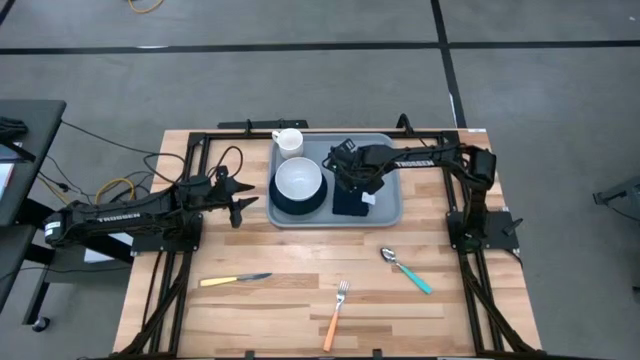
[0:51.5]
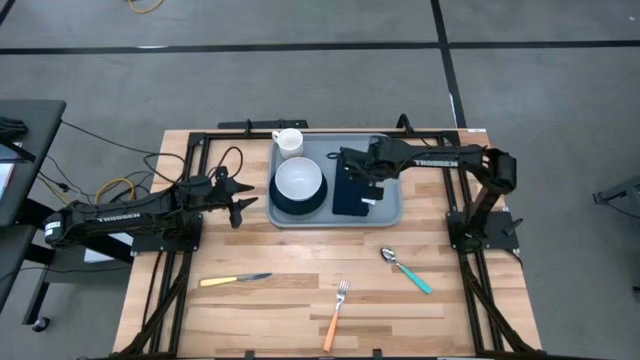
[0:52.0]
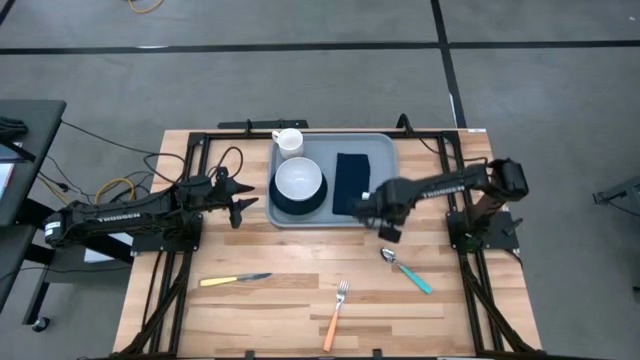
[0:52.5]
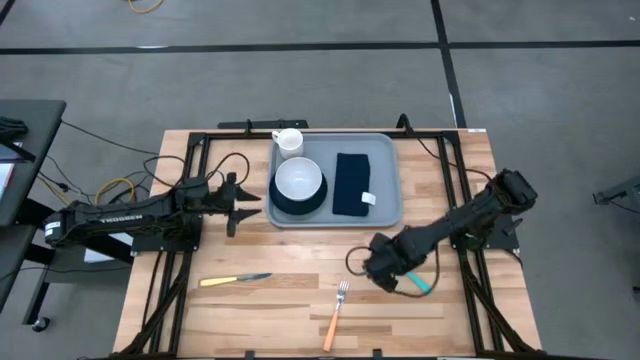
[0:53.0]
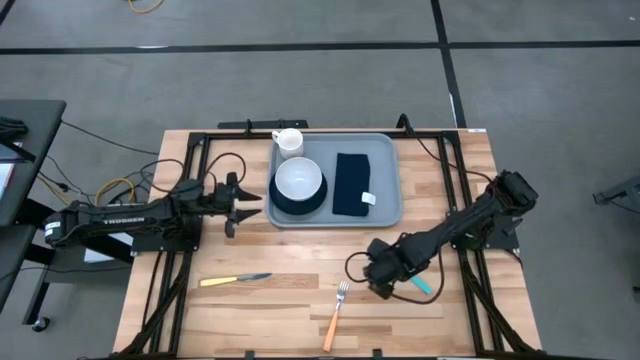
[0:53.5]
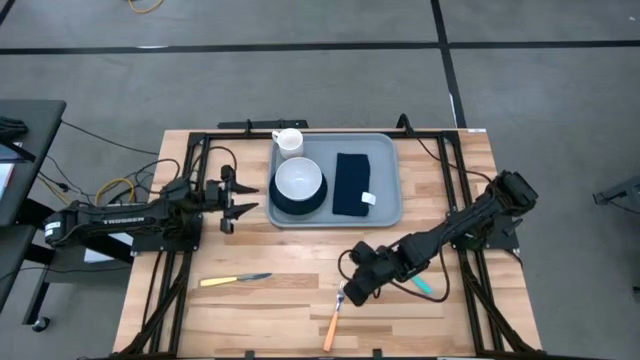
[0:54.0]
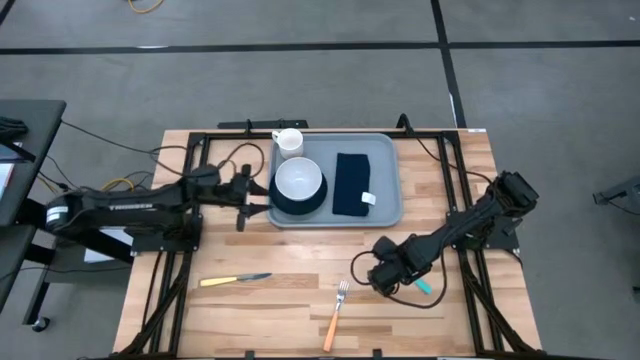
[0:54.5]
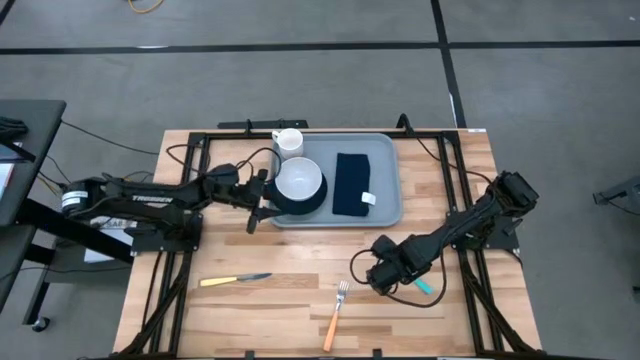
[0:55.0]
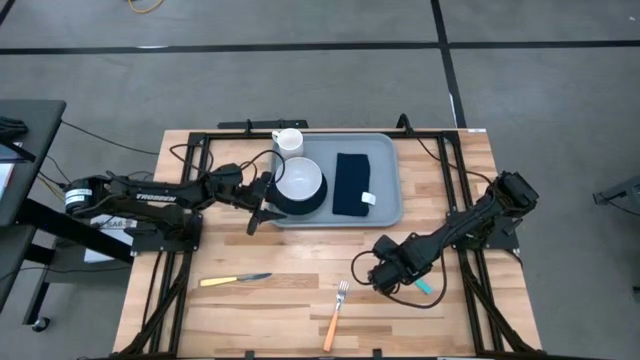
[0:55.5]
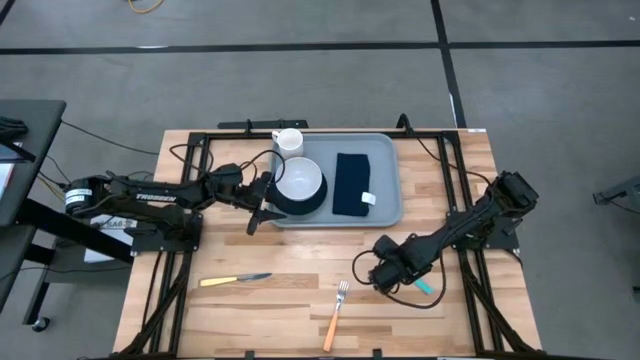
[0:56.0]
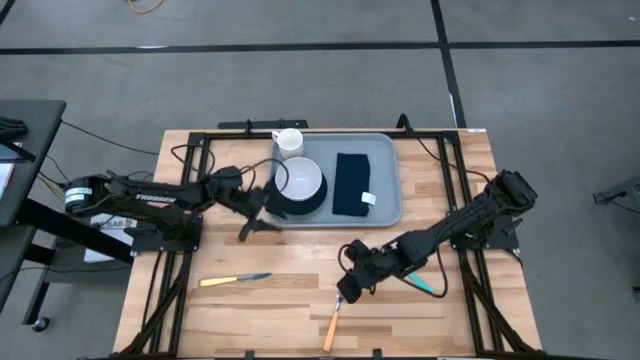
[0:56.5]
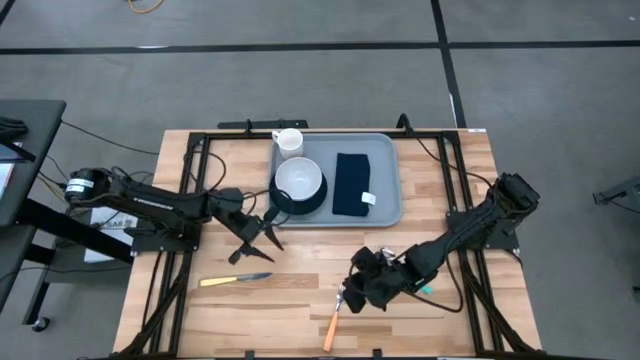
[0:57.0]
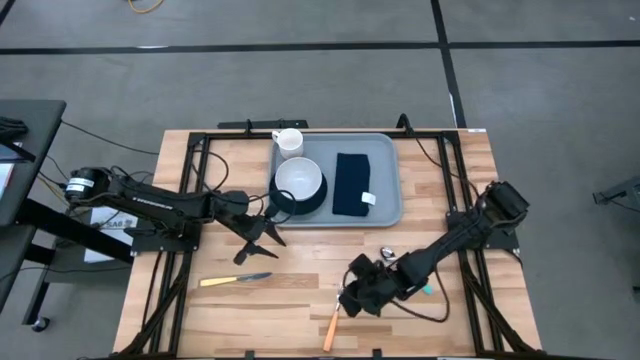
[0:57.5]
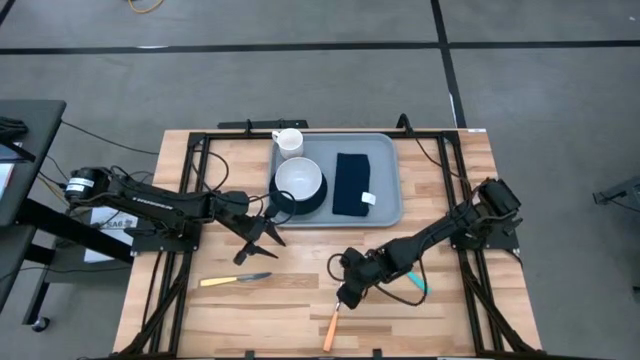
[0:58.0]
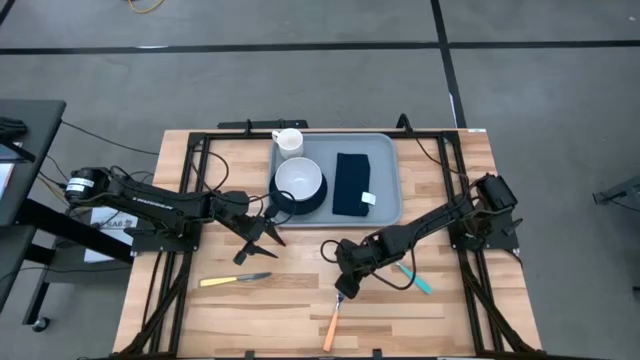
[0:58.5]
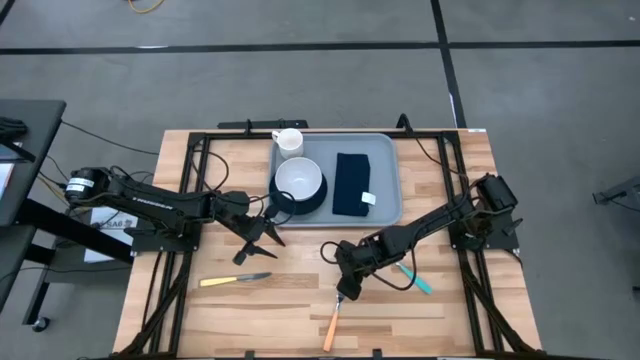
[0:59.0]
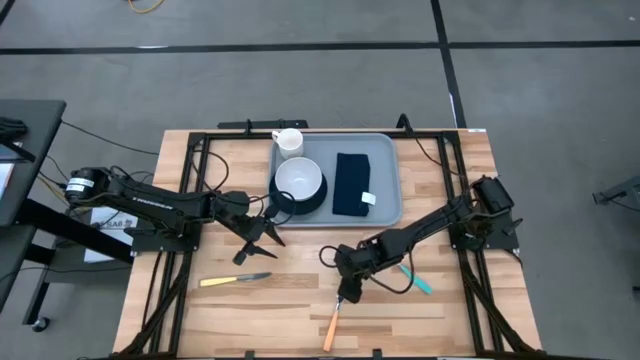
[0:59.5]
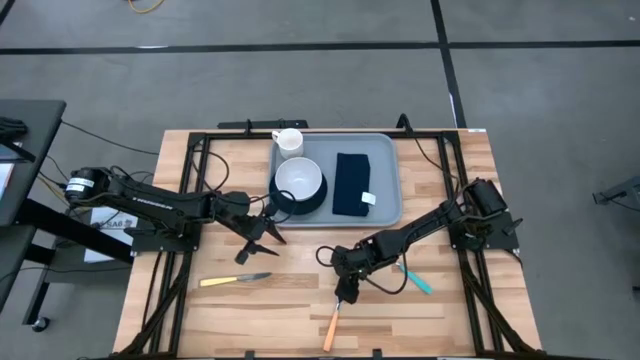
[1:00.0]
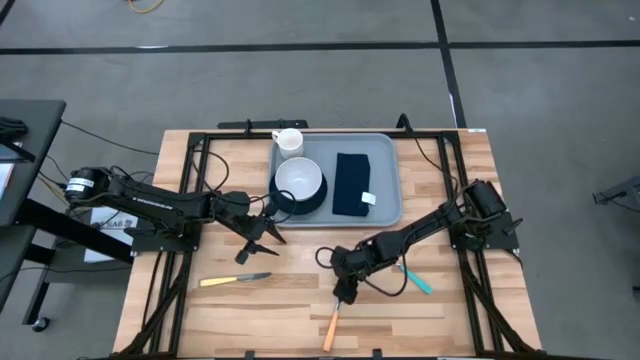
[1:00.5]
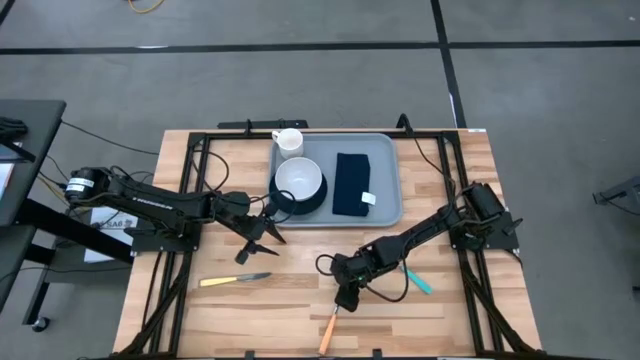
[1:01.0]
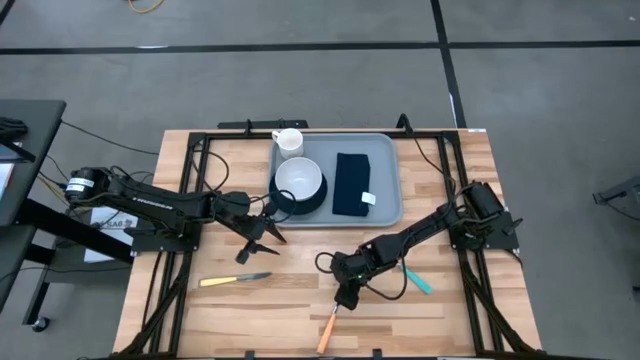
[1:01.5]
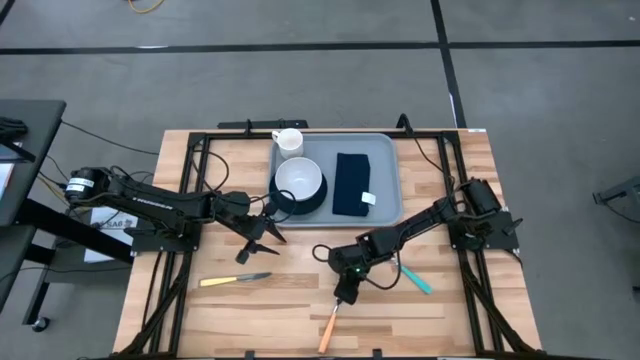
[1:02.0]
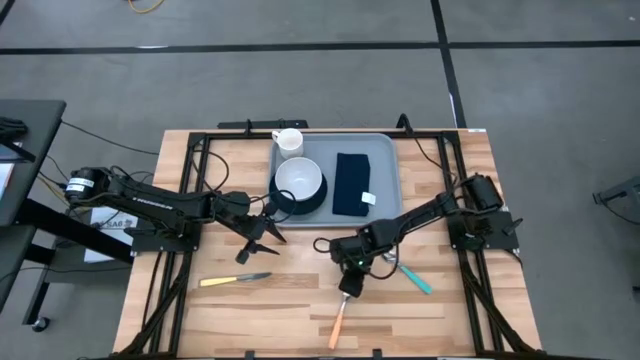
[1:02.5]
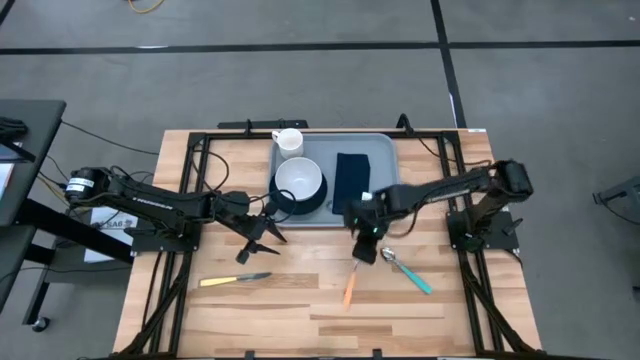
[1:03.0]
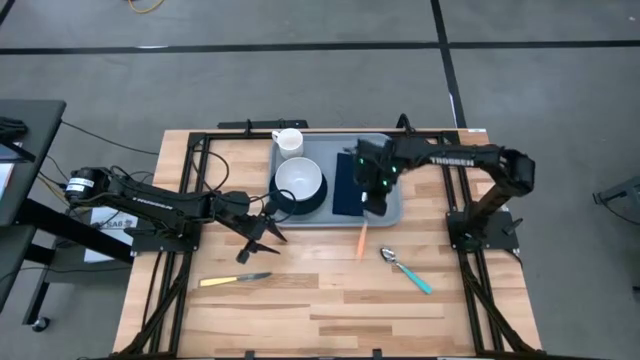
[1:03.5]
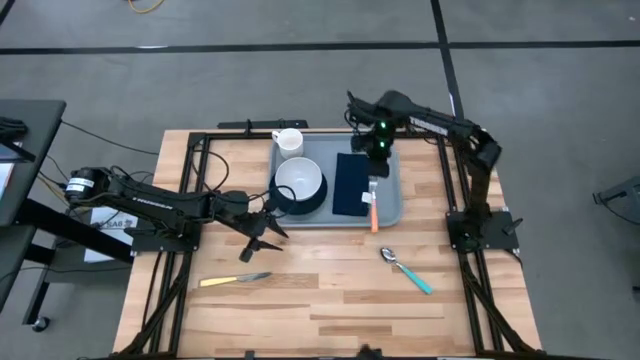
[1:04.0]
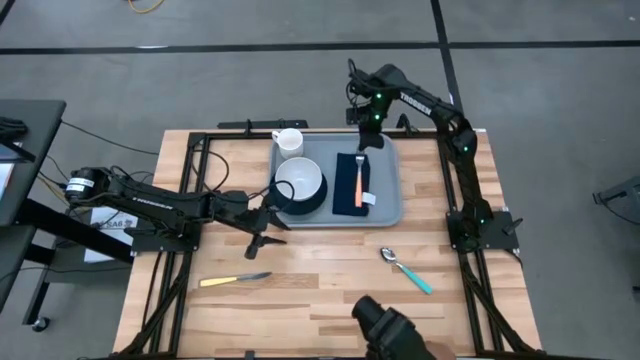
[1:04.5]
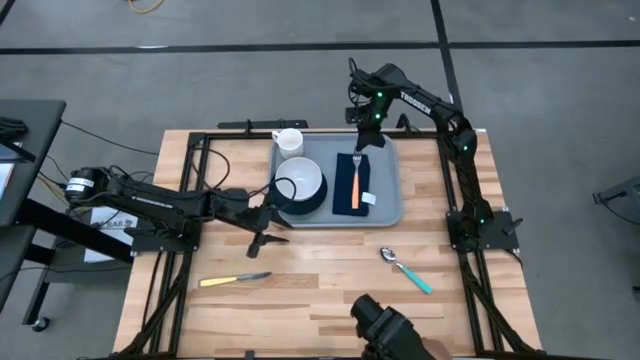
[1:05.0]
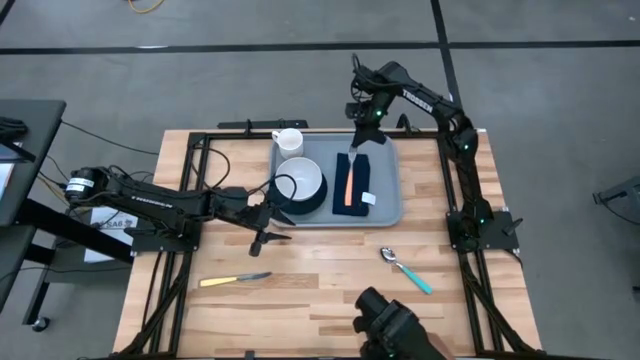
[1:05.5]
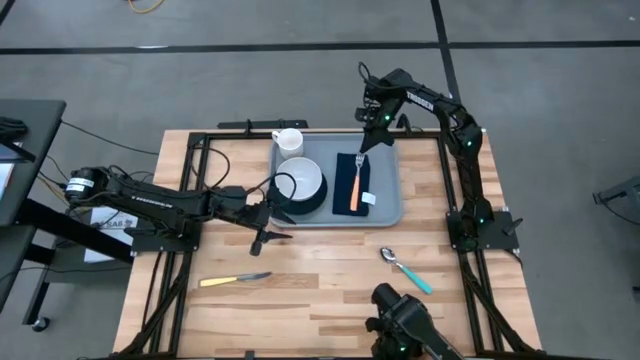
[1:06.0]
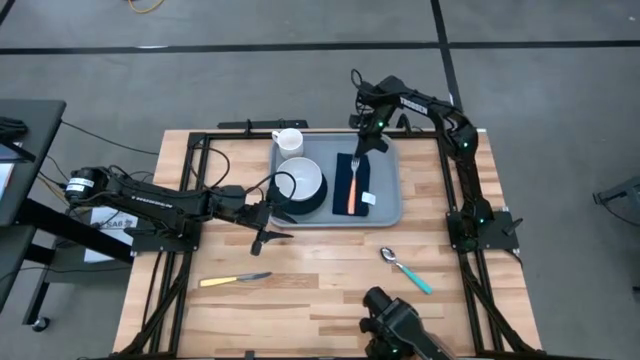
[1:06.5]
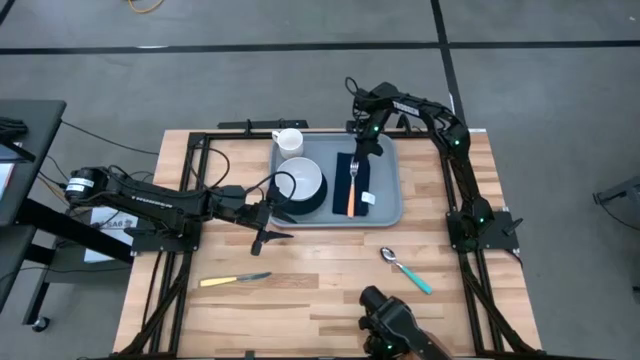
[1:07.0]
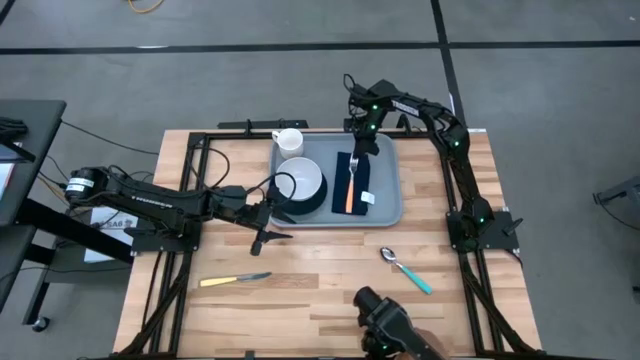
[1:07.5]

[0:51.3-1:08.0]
Task: Set up tray
Put the fork on top of the black table napkin on the gray serving tray

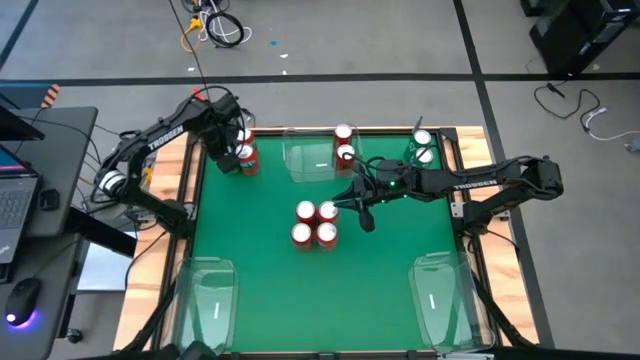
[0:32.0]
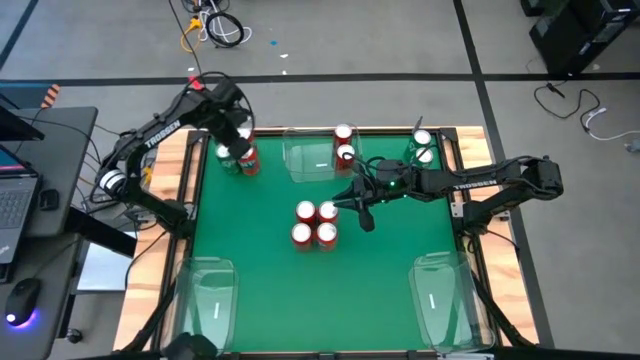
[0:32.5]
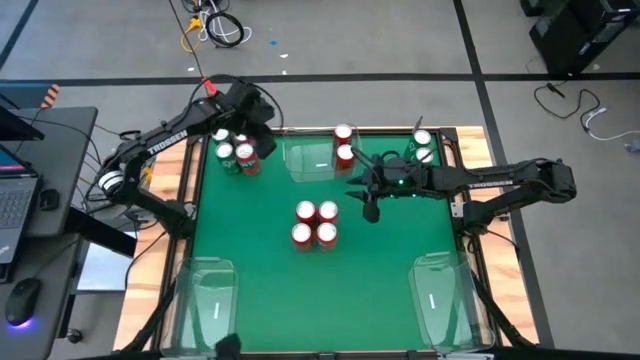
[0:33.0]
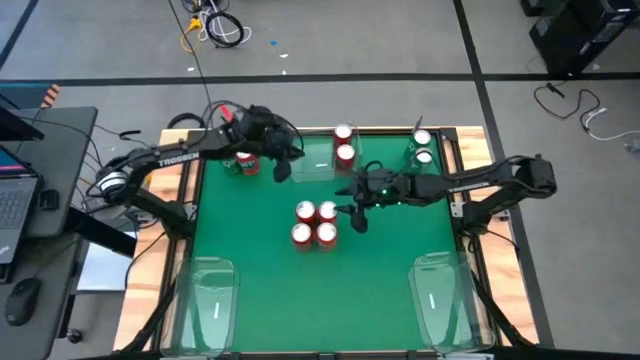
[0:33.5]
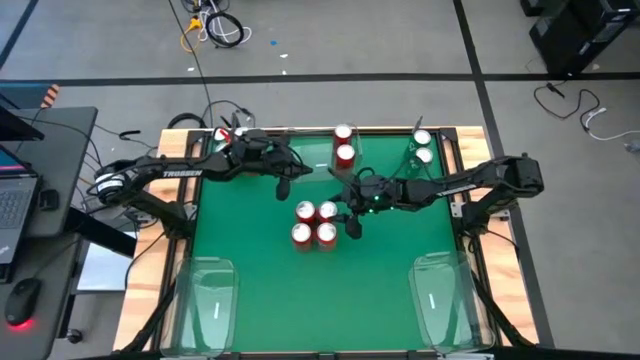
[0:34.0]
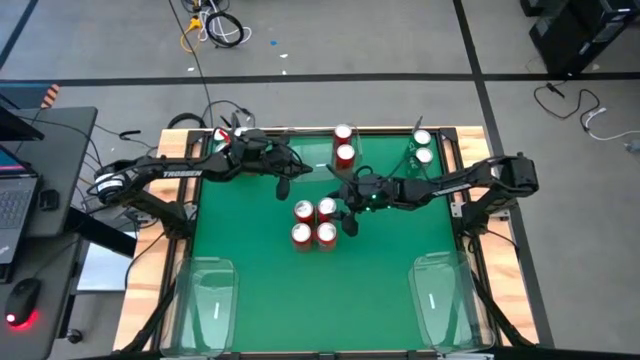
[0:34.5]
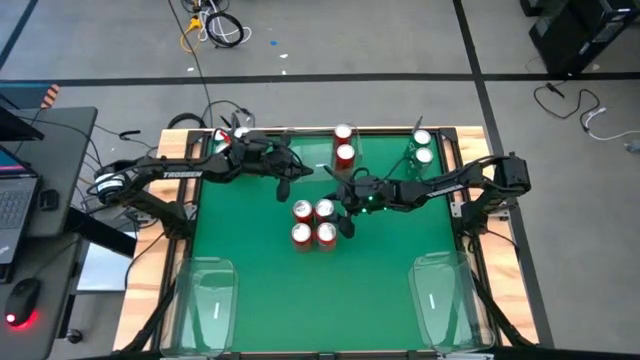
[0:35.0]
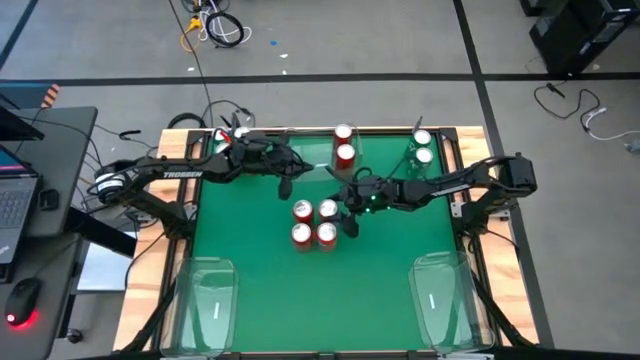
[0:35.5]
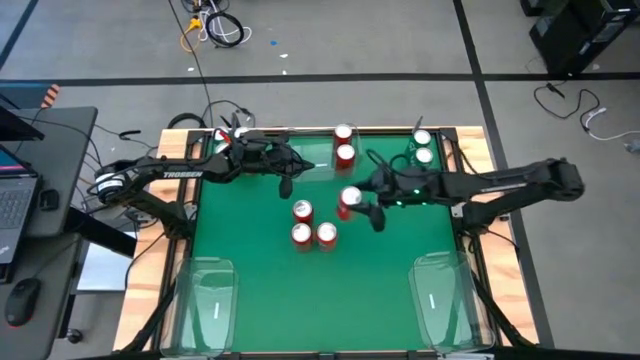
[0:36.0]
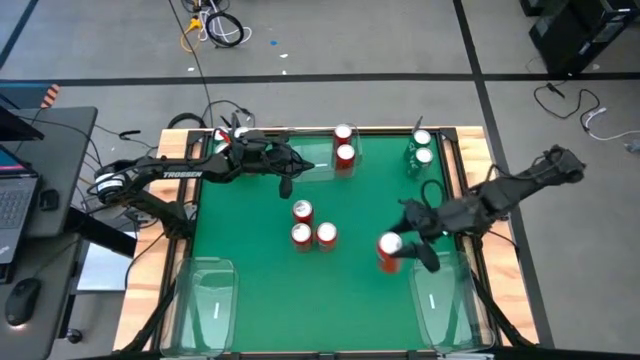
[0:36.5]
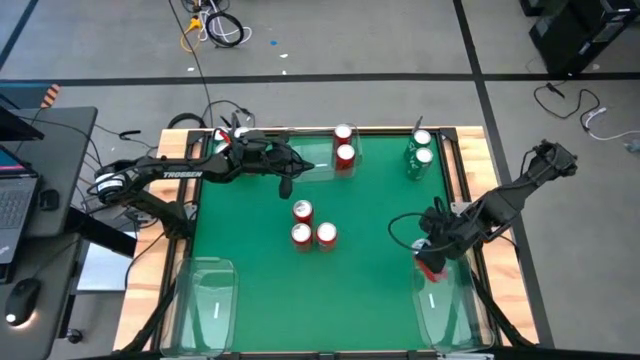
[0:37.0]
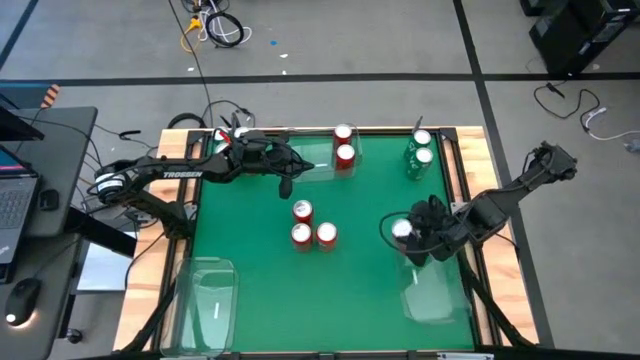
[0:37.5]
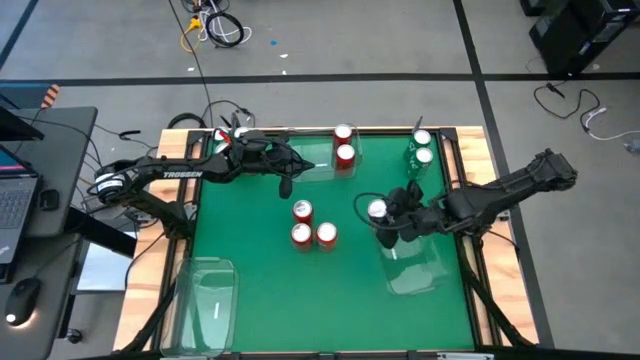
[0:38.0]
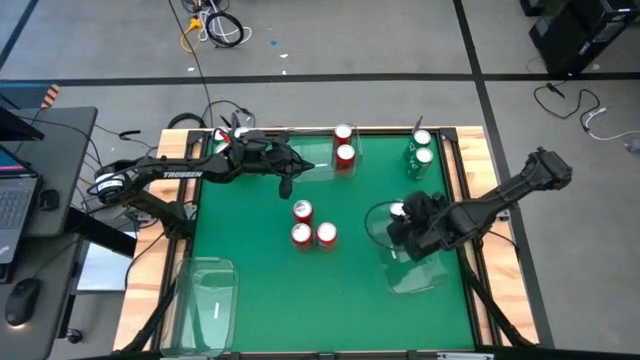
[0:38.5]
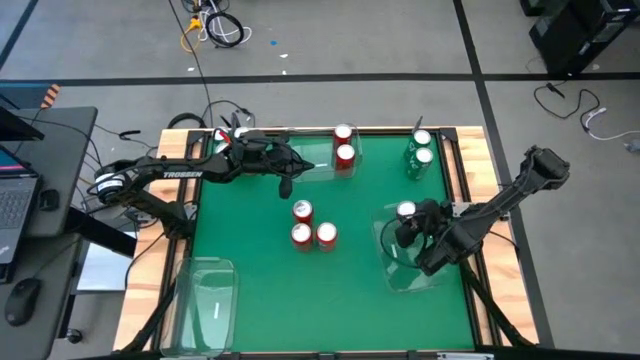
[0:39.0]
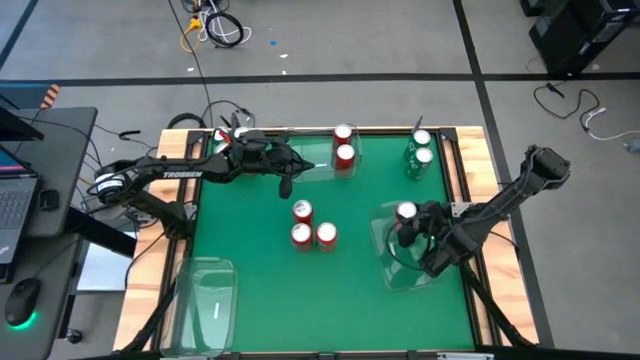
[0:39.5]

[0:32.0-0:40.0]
Task: Sort soda cans
Put the red soda can into the middle right transparent bin
